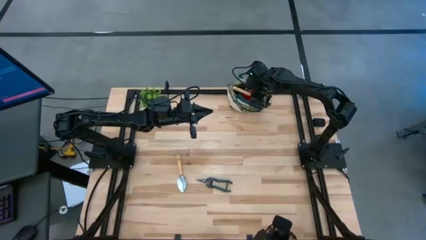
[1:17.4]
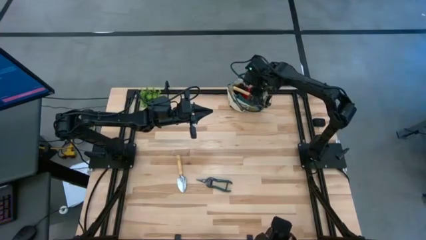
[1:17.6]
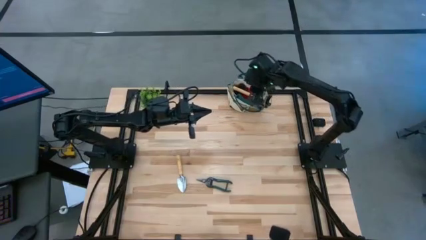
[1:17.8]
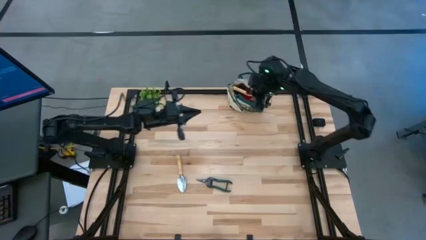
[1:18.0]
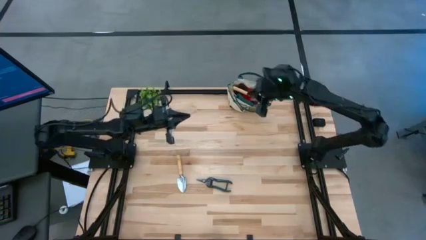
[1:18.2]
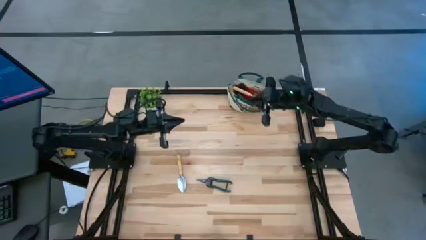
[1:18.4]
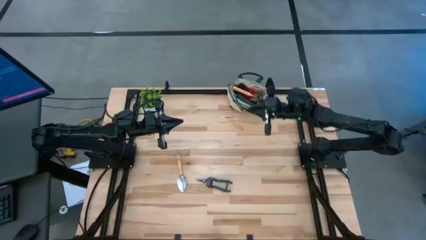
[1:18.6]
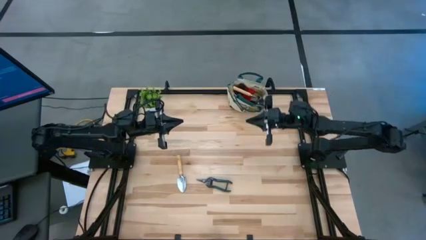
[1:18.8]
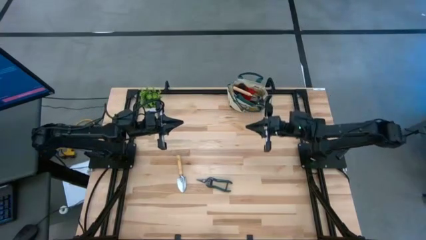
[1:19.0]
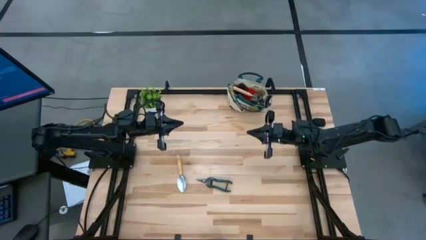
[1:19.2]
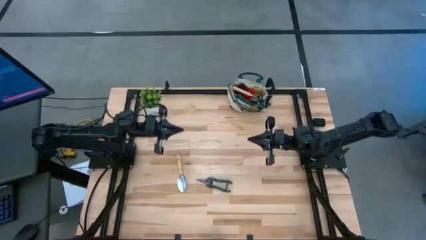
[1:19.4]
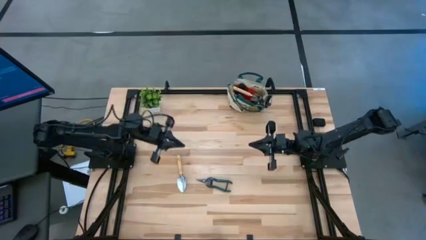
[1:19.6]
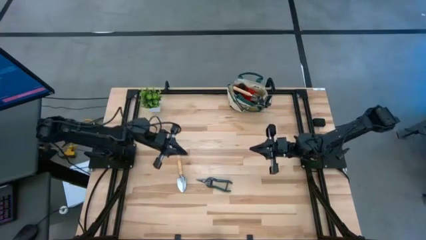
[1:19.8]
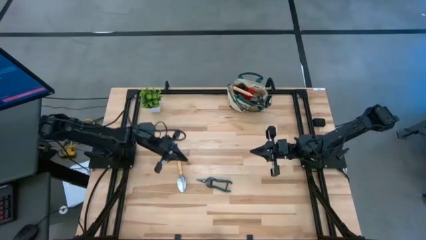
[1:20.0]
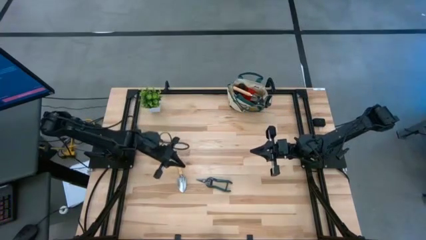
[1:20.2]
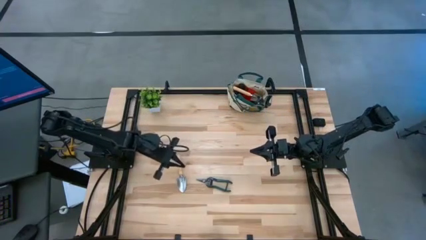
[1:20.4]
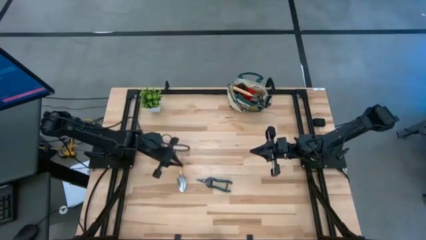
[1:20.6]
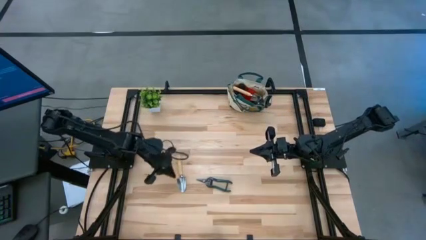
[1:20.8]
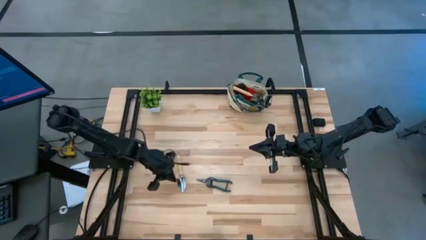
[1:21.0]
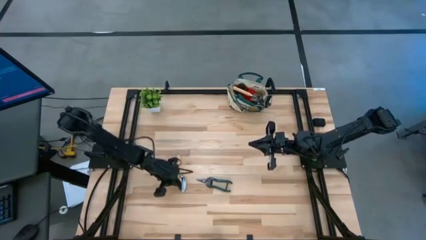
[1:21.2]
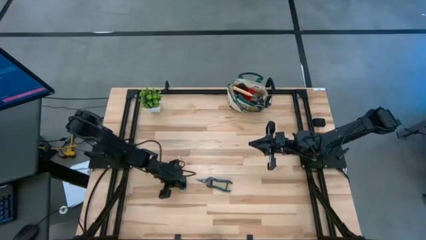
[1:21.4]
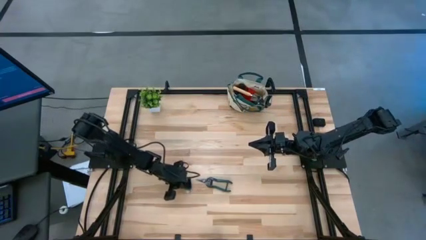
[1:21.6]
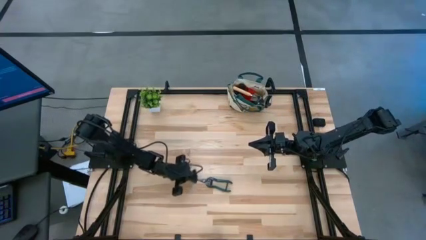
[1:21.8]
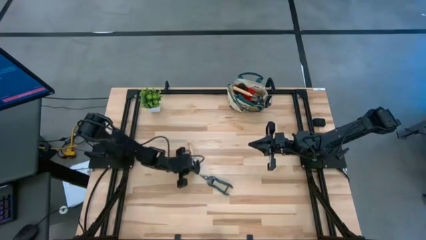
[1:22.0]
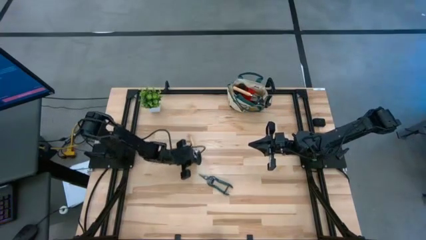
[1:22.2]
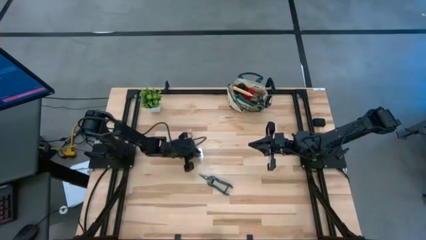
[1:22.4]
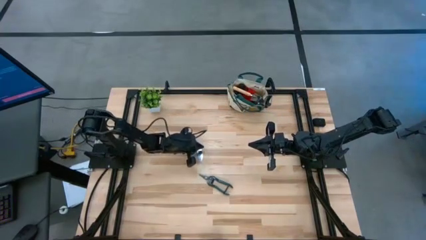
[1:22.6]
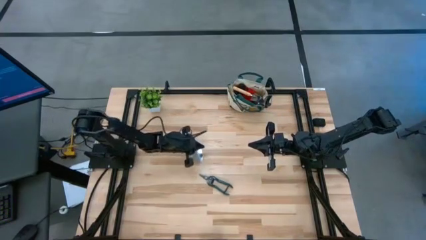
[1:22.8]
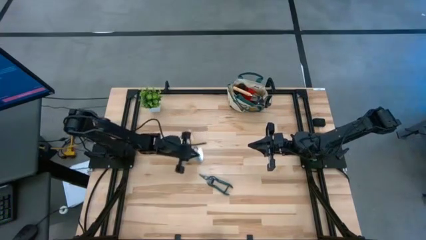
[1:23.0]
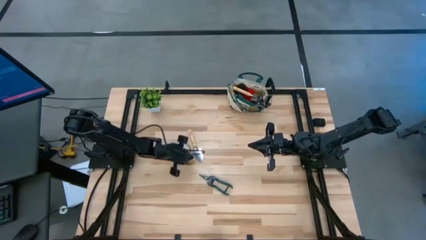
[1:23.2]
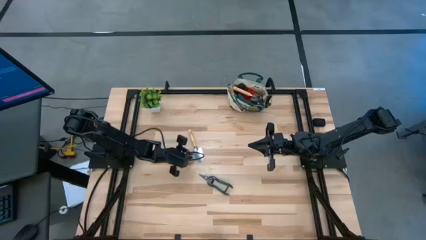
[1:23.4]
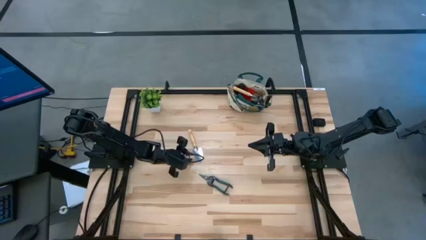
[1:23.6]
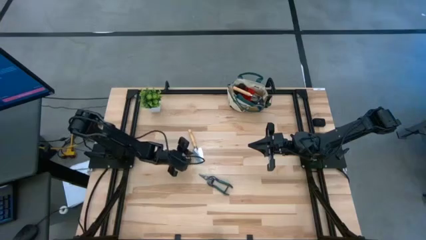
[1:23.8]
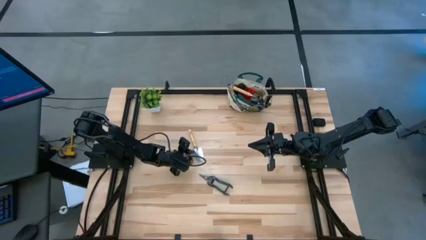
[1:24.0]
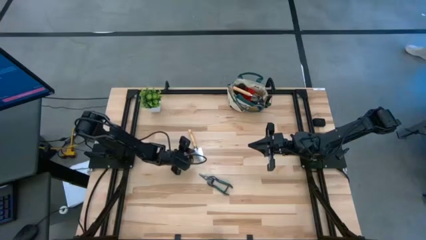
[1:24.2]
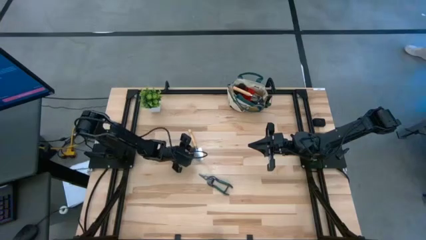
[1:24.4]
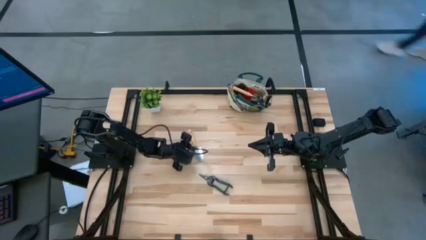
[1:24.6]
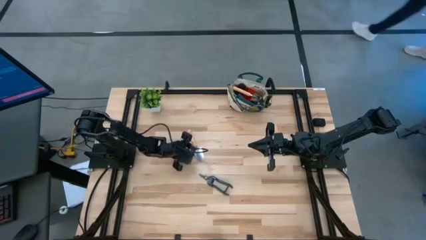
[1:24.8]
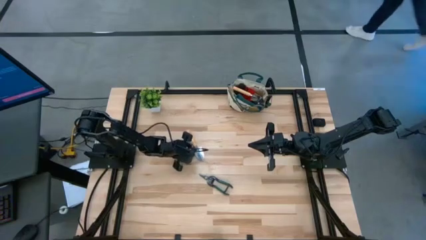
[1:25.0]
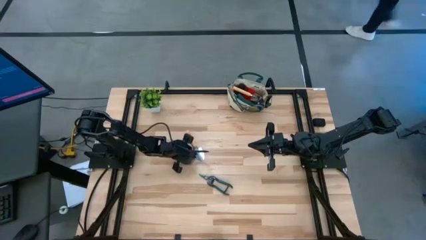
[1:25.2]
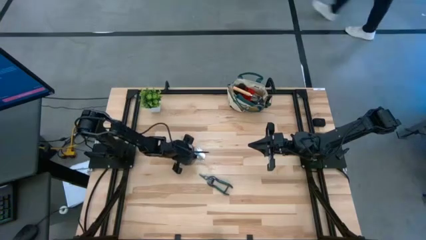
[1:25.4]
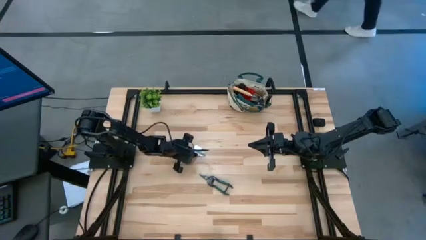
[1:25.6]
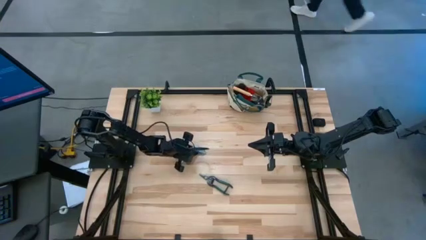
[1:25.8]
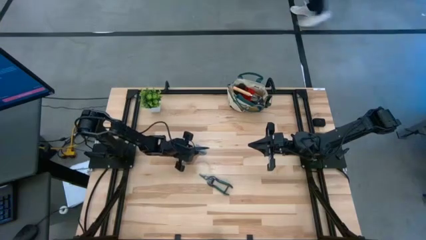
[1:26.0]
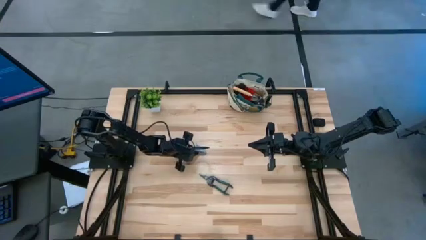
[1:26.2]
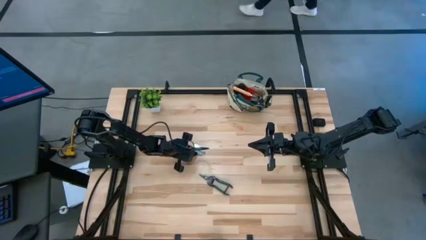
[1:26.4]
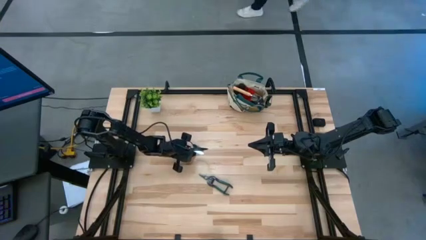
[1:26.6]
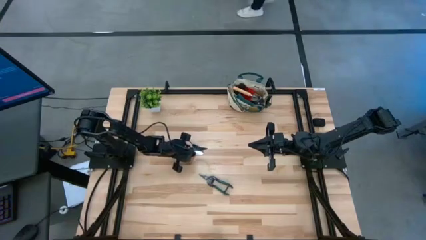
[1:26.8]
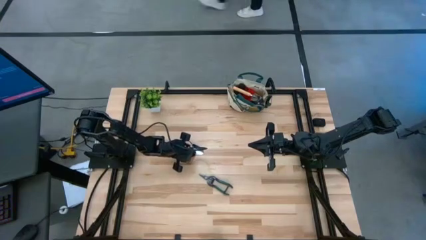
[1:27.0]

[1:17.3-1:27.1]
Task: Pick & Place Garden tools in Gardening bag
Put the brown trowel into the gardening bag

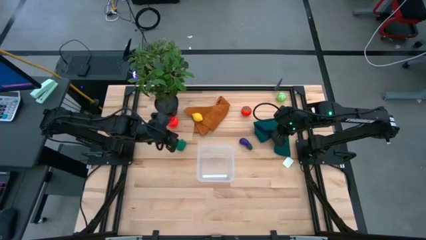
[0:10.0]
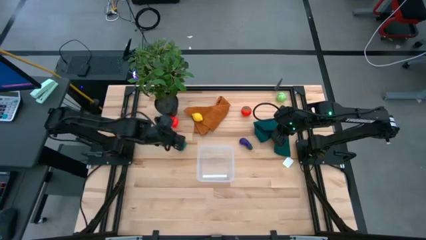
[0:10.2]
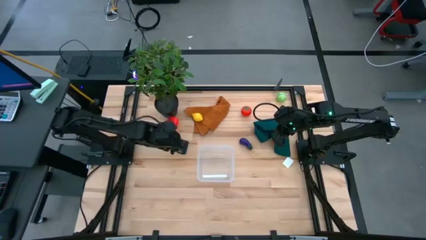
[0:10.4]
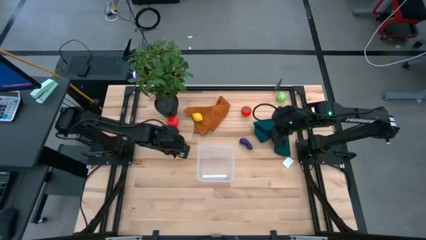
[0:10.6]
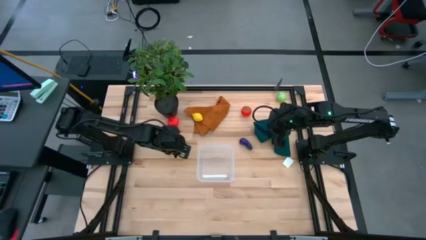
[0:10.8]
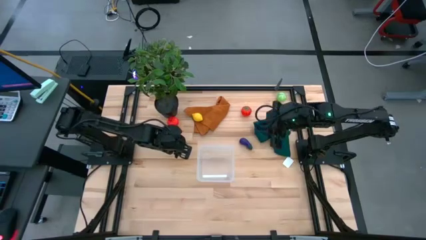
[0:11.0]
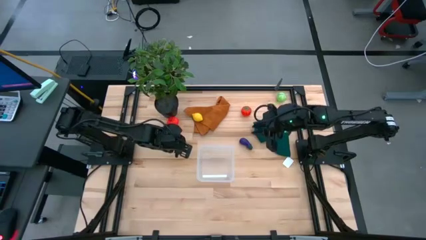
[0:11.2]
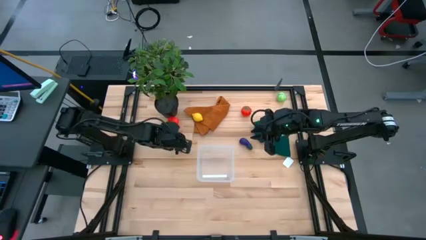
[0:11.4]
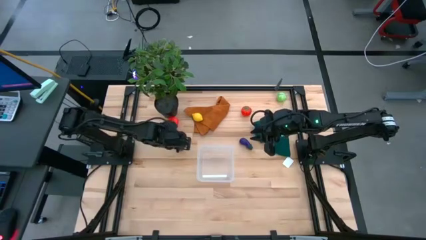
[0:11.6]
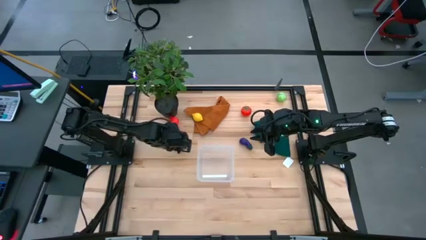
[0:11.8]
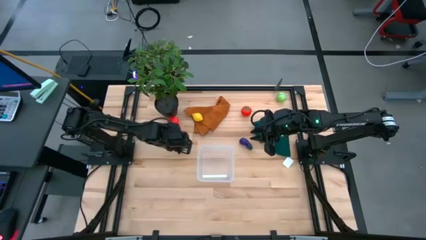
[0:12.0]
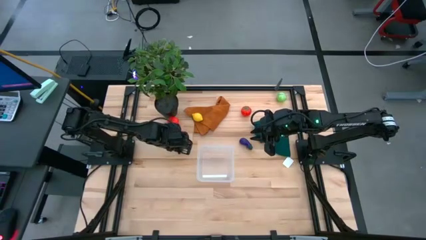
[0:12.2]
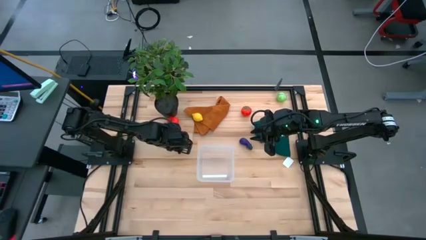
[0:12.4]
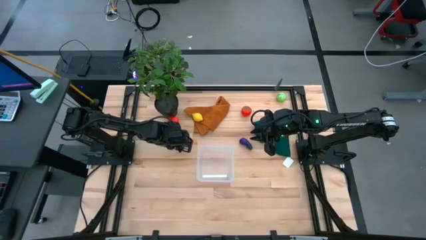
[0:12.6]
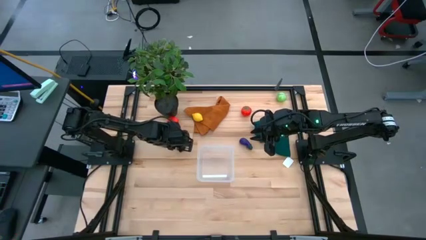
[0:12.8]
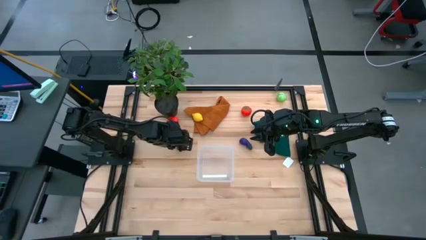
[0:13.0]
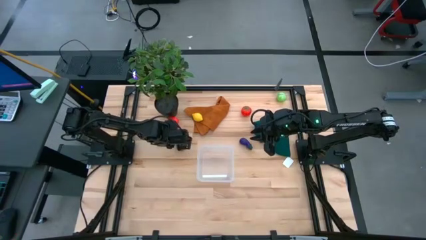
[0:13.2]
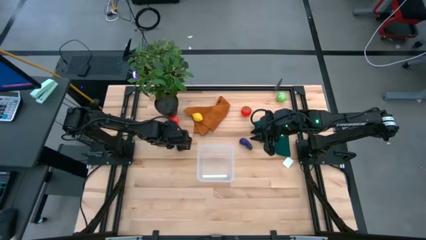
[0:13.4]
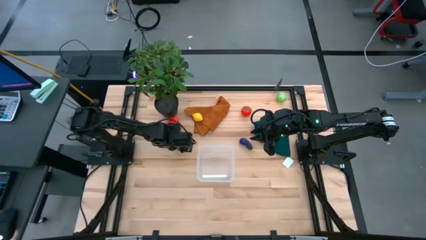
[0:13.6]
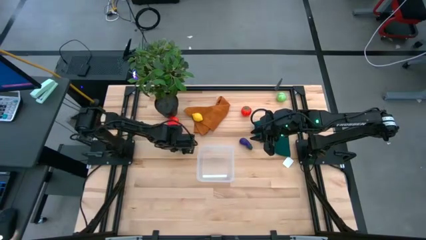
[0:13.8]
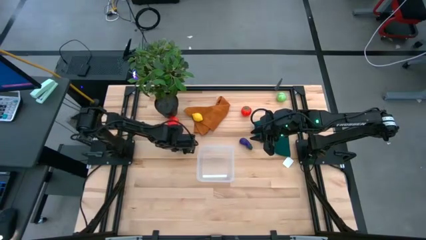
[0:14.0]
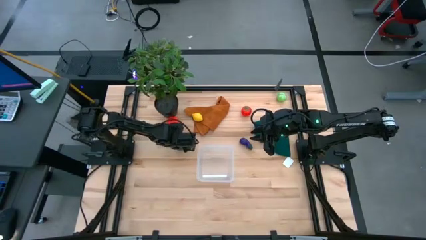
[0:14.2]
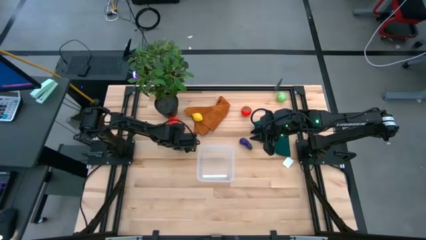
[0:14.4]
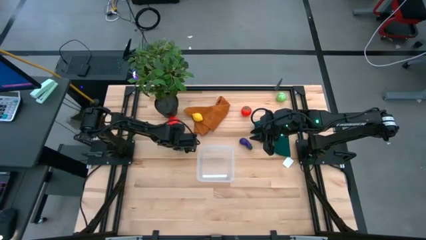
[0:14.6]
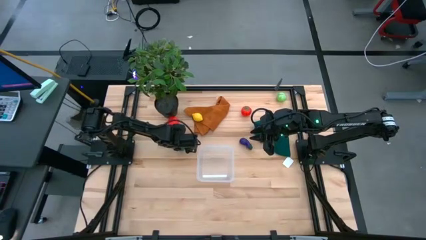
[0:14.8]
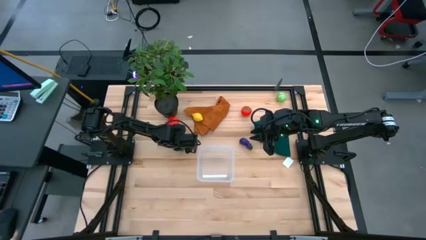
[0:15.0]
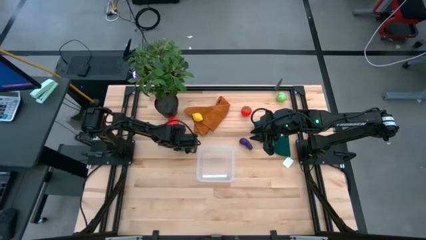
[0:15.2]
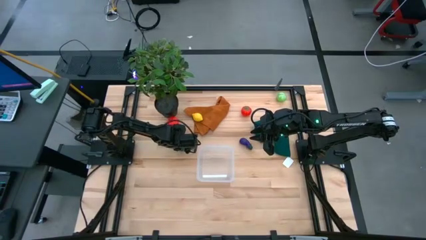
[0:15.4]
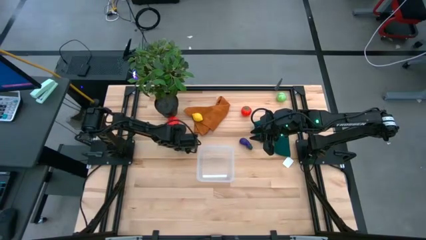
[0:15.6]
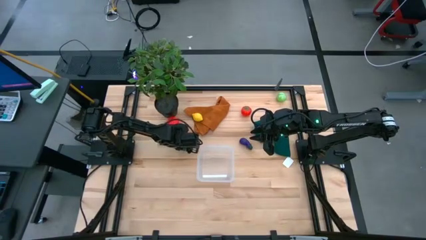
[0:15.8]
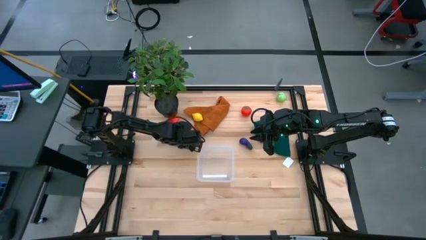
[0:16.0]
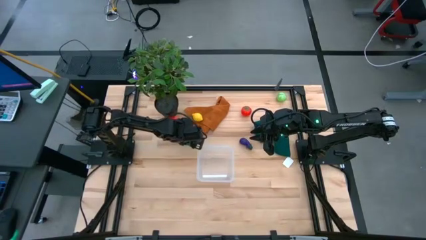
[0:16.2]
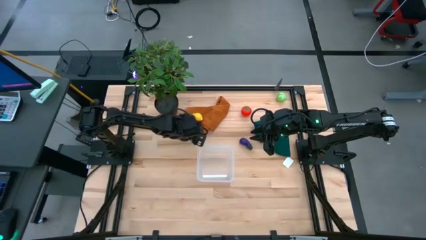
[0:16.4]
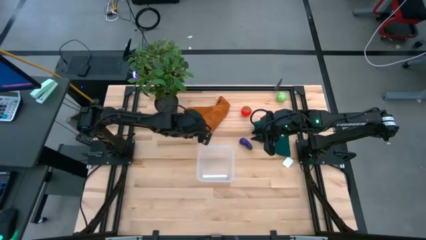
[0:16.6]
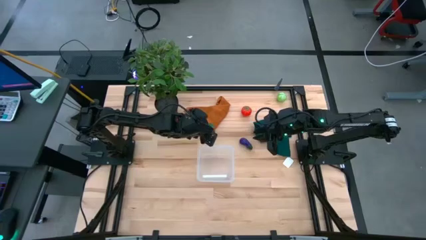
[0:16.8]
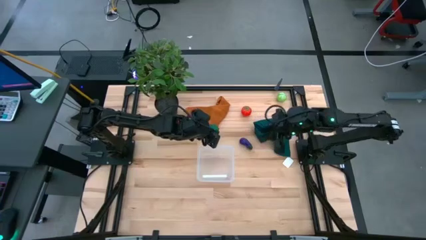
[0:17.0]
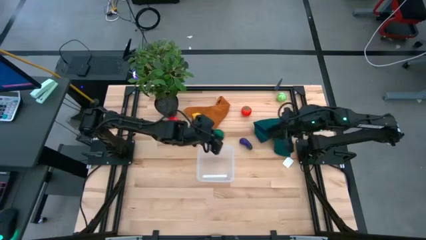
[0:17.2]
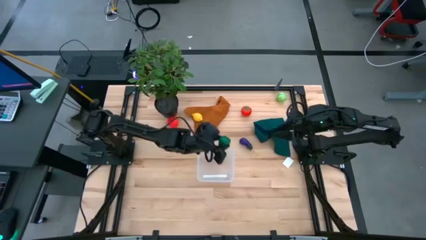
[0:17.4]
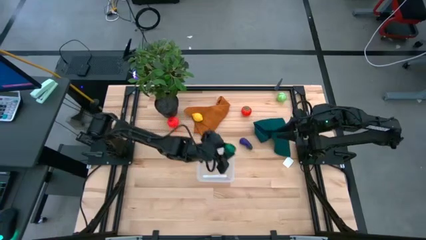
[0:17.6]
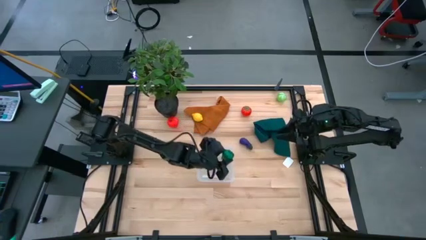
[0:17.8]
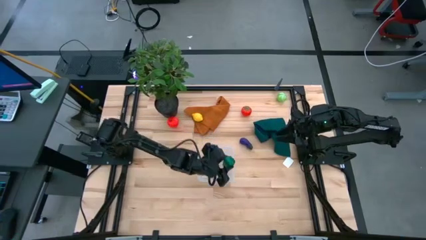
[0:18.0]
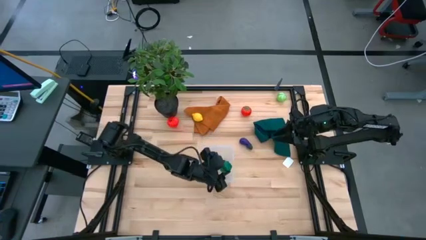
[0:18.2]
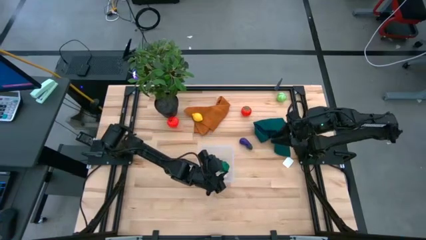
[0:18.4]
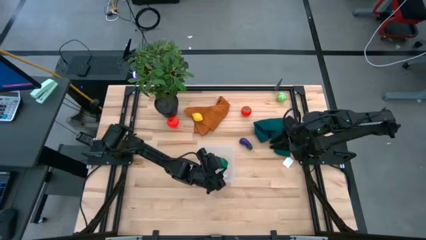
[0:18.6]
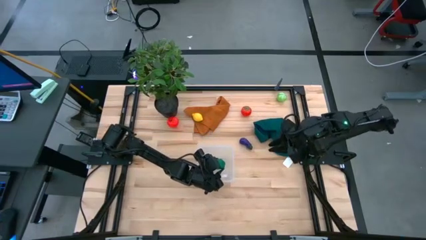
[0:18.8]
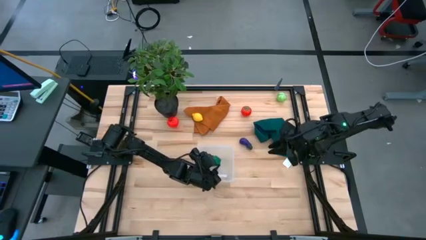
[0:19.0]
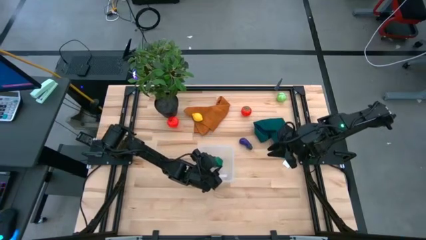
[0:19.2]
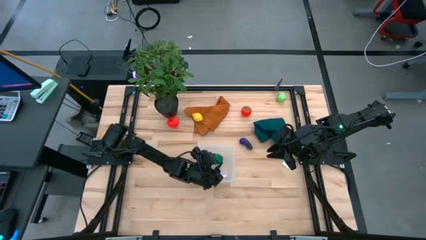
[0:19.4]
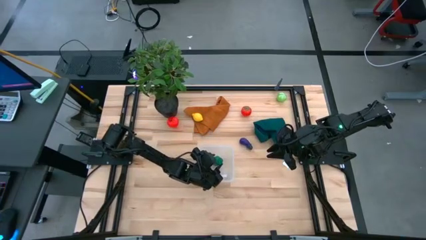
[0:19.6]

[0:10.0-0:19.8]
Task: Pick and placing Produce into tupperware
Put the green bell pepper into the transparent bin
